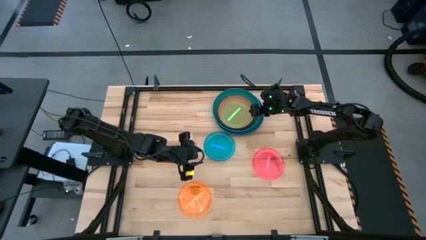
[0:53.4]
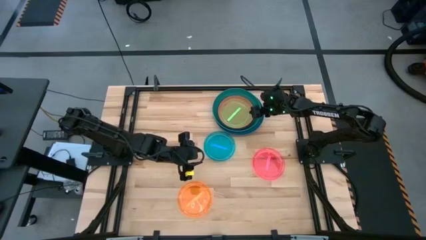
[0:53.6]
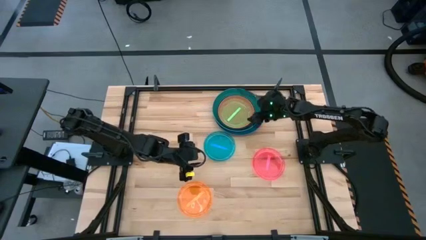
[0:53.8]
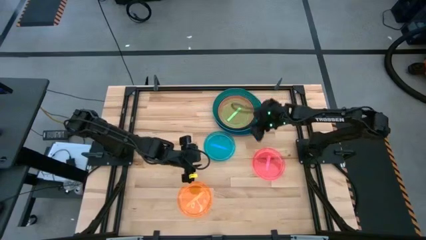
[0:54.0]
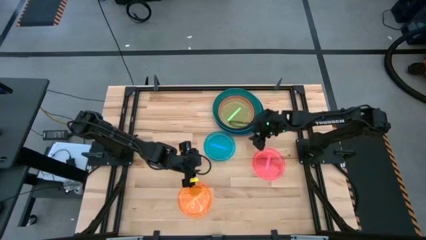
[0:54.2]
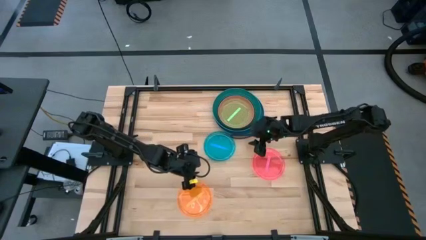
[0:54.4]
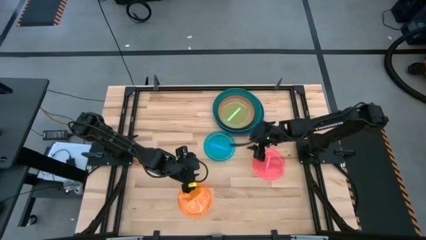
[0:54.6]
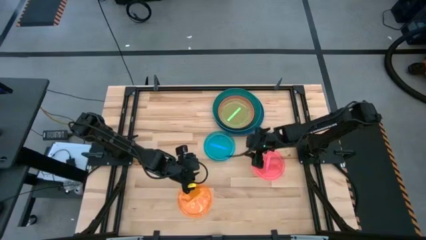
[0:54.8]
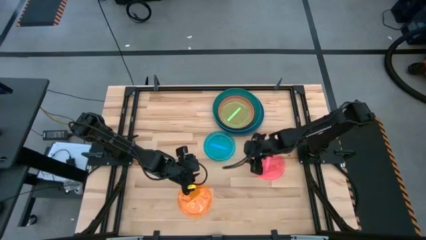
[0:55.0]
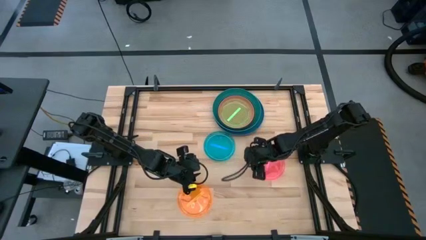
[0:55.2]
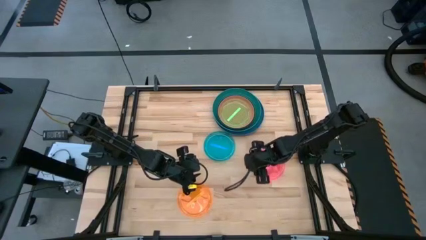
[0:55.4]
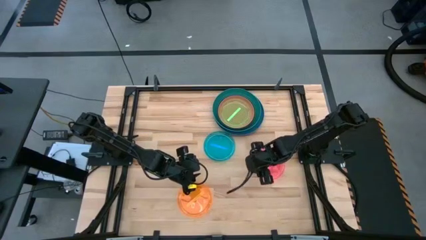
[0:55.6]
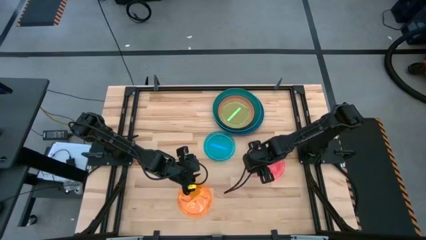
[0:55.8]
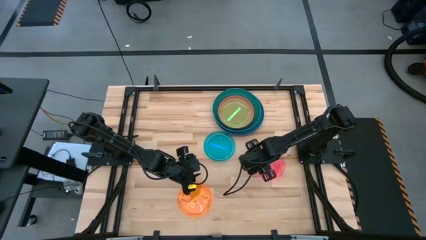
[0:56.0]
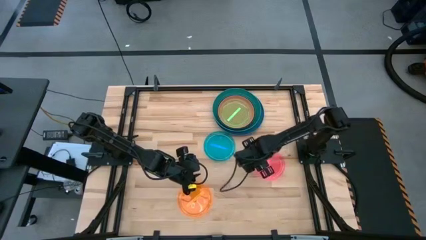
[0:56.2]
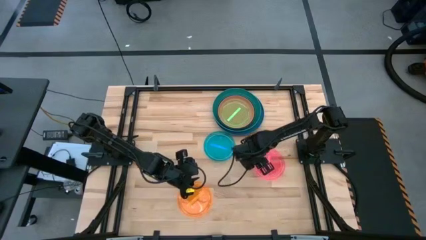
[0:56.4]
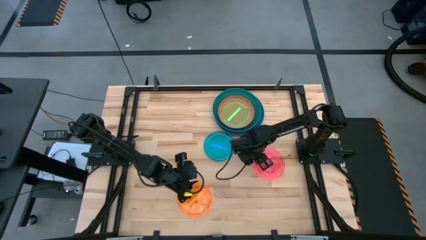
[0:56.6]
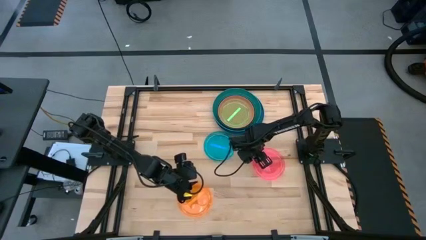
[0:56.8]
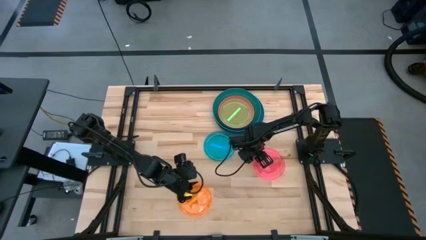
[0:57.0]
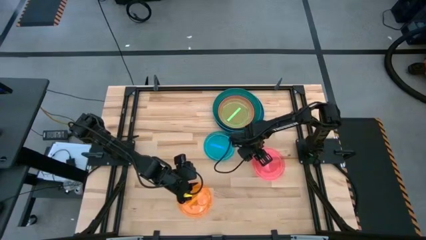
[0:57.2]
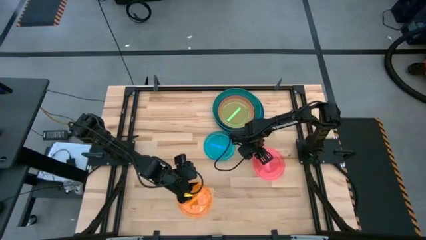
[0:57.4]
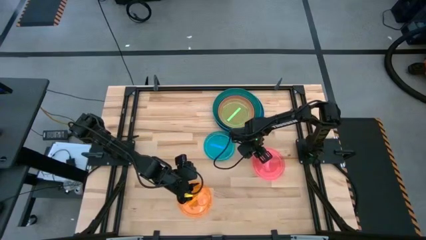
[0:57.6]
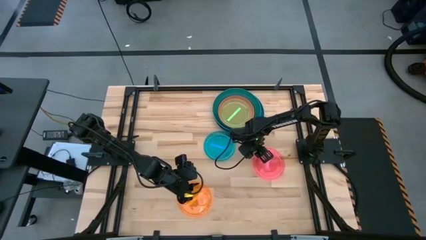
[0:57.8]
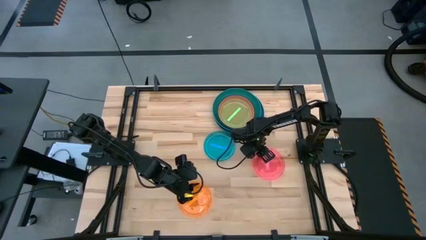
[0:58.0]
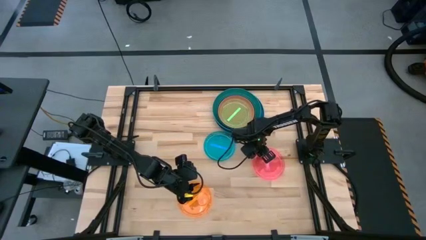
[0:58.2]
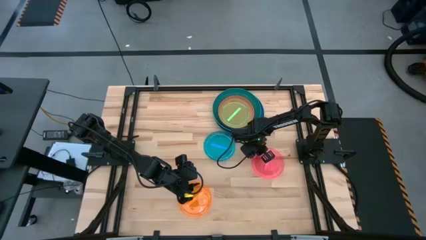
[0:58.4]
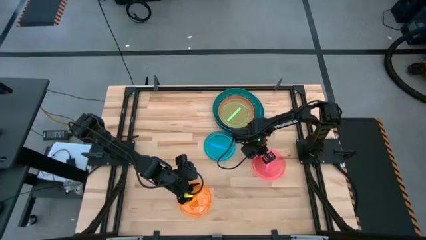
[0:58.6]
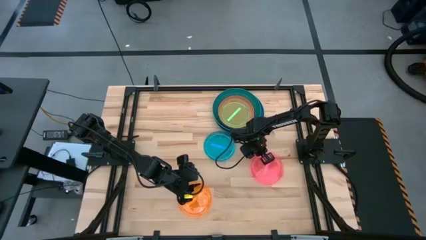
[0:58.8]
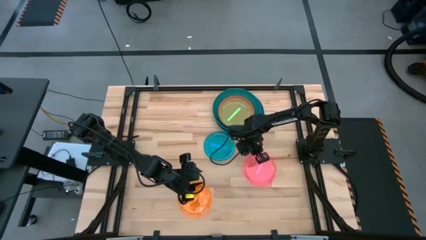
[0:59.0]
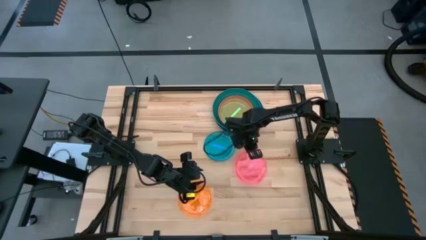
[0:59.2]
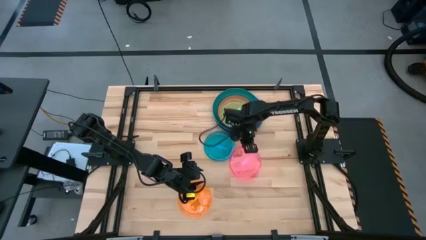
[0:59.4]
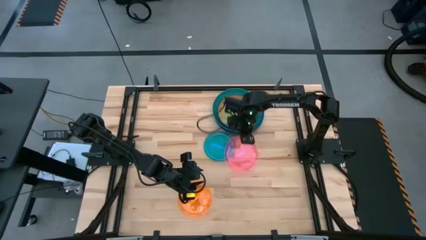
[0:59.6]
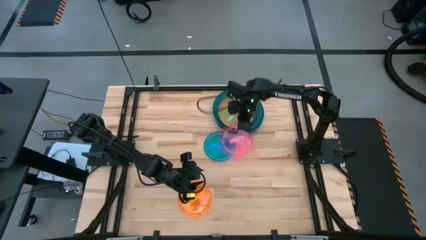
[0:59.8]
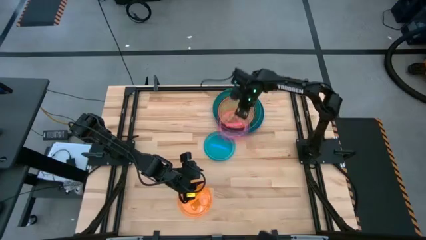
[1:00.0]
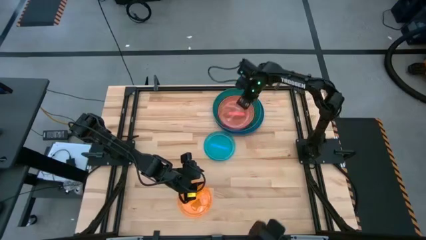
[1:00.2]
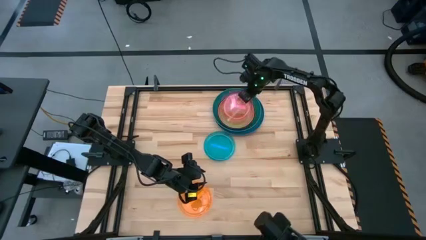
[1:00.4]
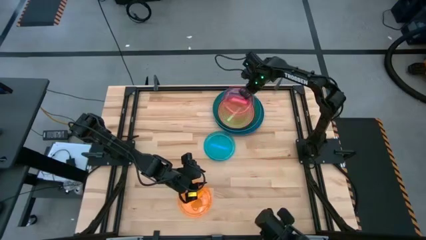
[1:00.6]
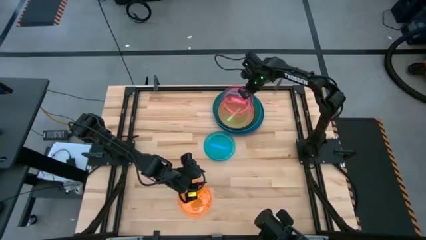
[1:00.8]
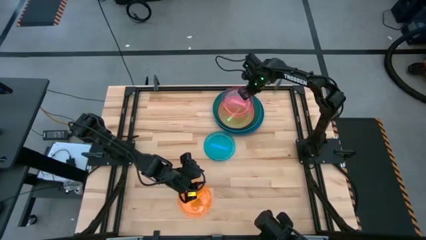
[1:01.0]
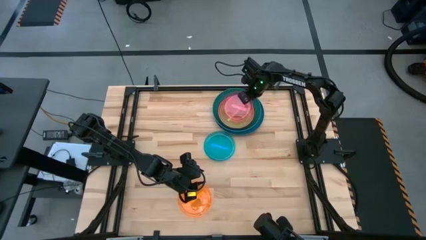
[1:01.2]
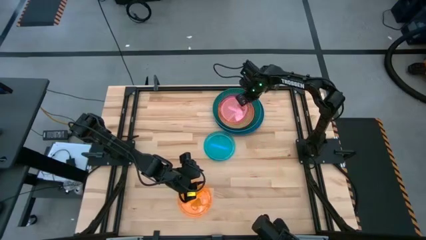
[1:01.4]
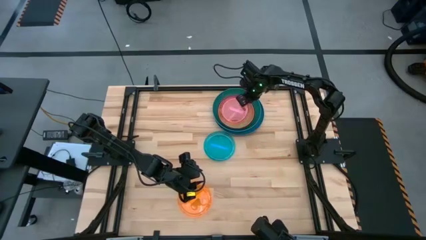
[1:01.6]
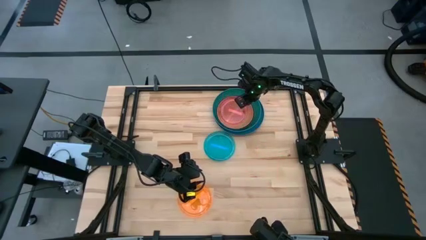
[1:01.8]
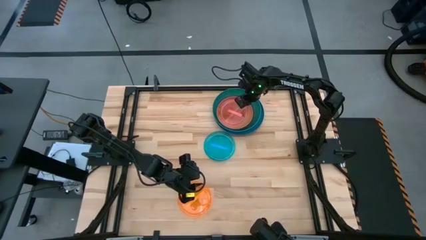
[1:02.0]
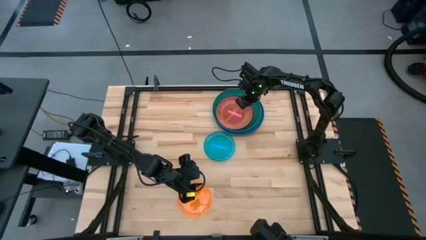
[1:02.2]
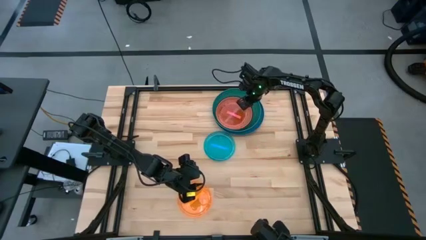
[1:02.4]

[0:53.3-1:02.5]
Task: Stack plastic plates
Stack the red plate on top of the green plate

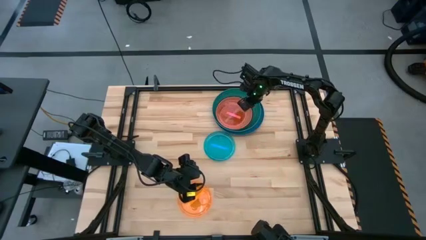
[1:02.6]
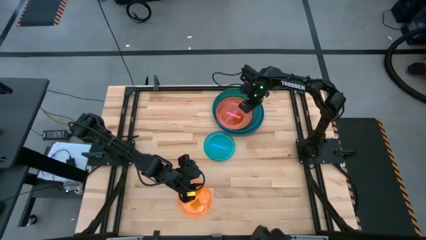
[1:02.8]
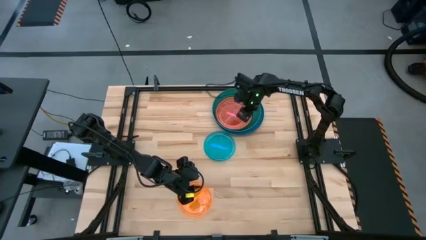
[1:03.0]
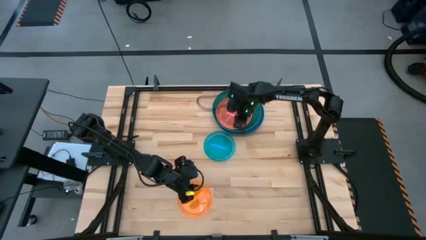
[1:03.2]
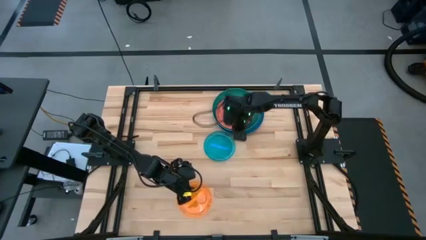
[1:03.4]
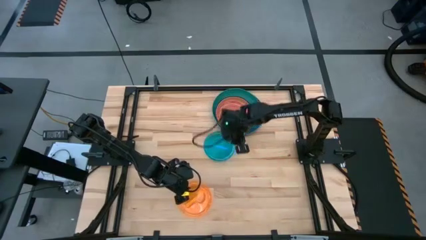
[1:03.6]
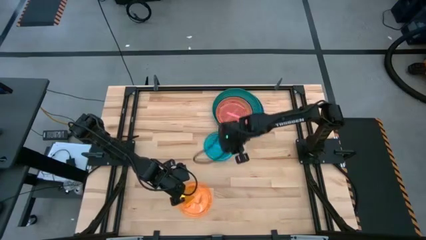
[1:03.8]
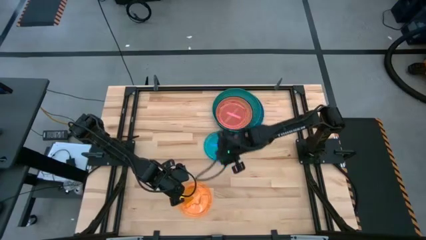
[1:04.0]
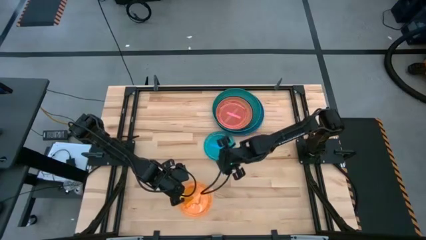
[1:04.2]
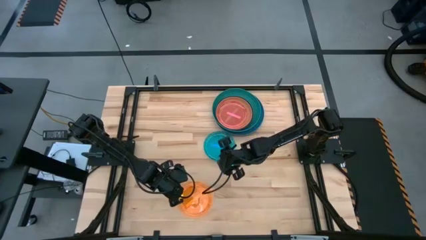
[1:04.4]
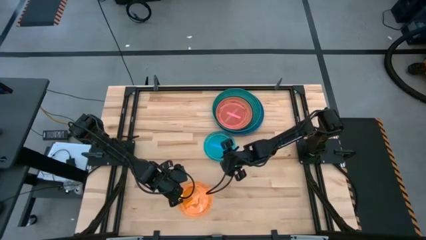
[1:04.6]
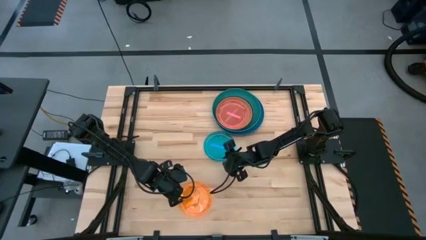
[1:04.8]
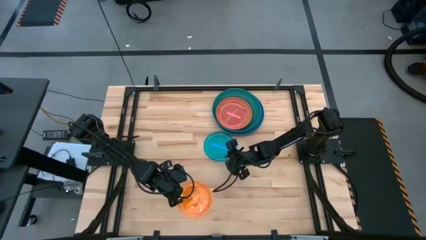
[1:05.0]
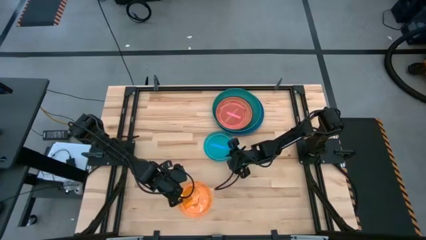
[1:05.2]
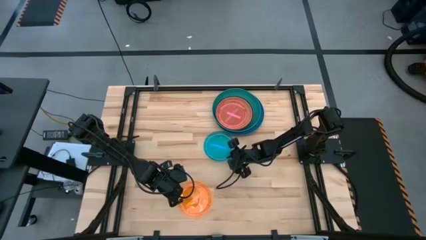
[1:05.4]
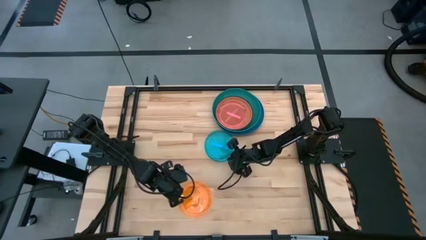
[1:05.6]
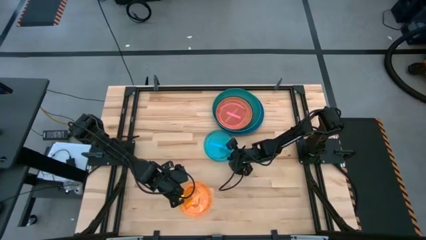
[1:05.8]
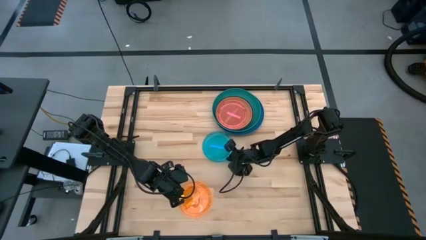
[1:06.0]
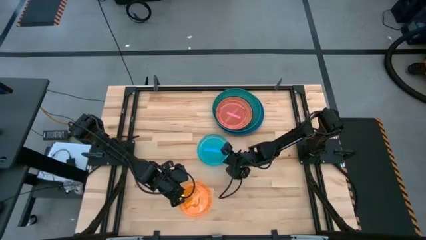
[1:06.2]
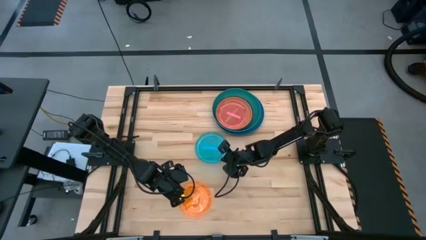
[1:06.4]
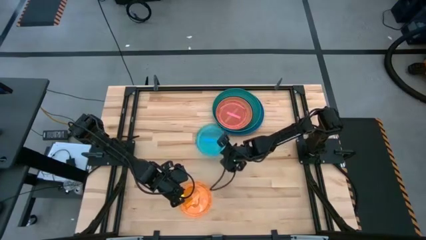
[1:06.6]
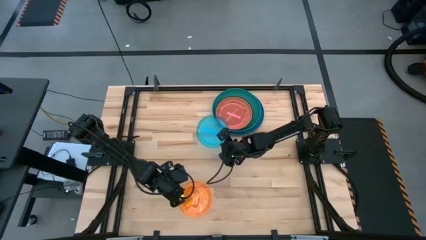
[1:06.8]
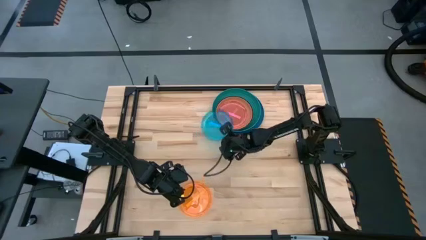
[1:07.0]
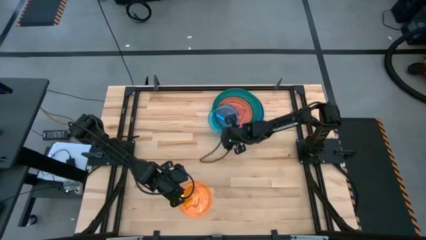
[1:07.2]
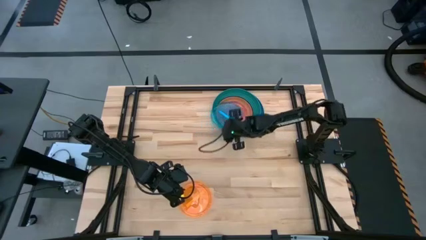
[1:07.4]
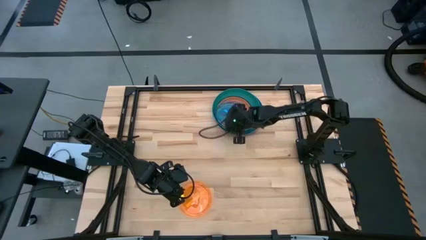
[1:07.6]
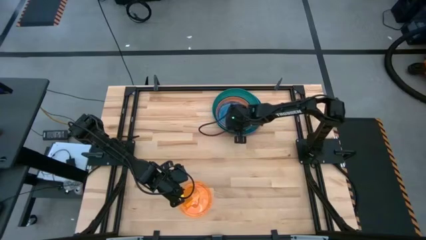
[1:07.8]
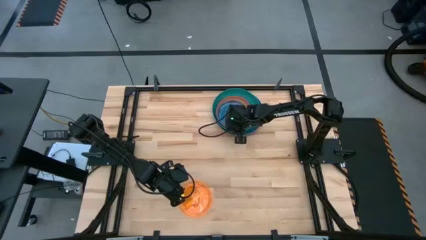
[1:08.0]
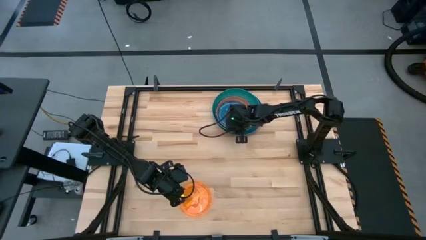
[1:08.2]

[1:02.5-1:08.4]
Stack the blue plate on top of the red plate
